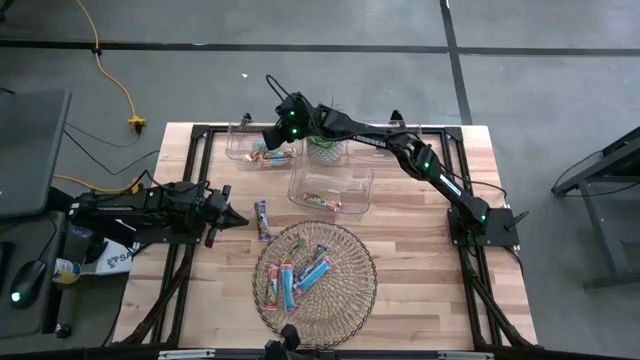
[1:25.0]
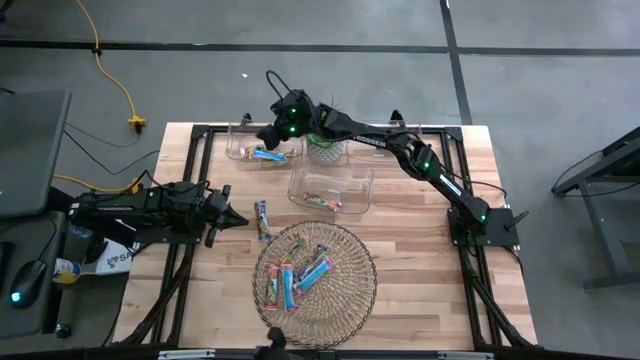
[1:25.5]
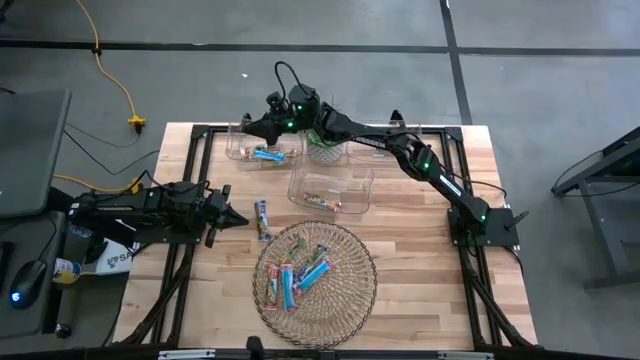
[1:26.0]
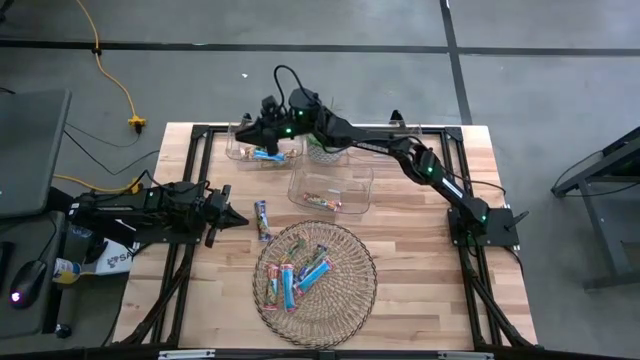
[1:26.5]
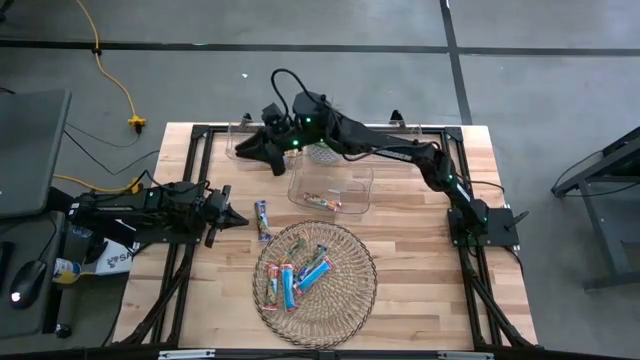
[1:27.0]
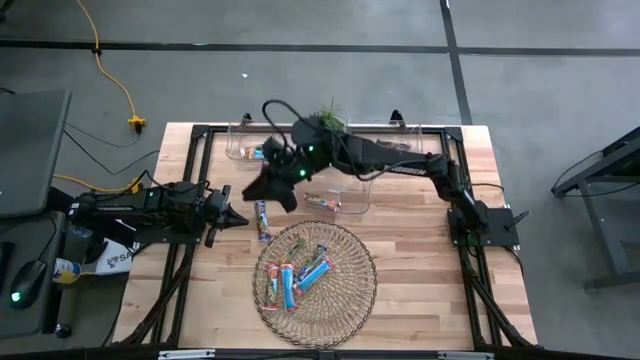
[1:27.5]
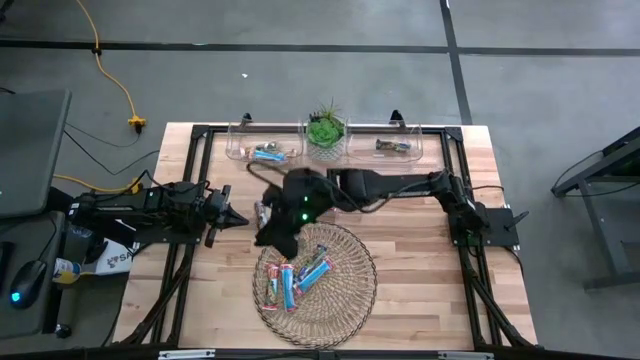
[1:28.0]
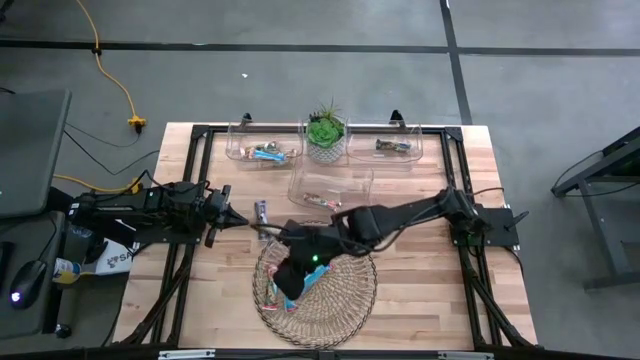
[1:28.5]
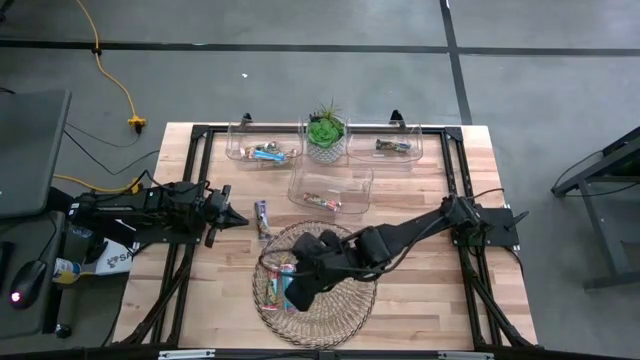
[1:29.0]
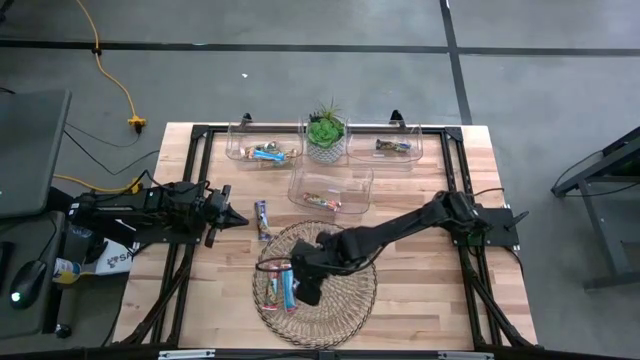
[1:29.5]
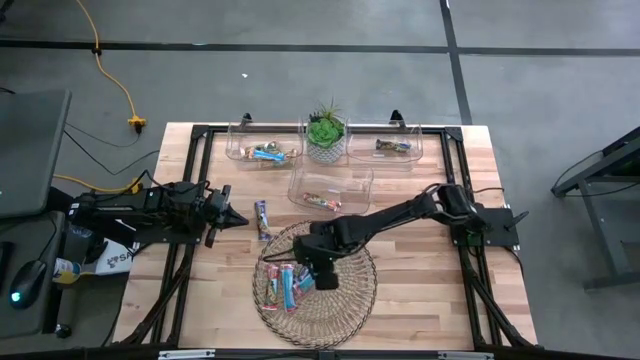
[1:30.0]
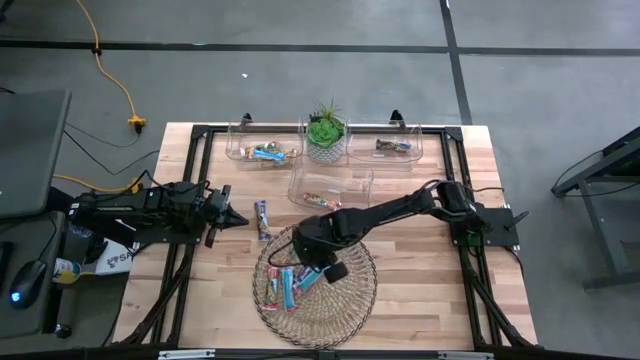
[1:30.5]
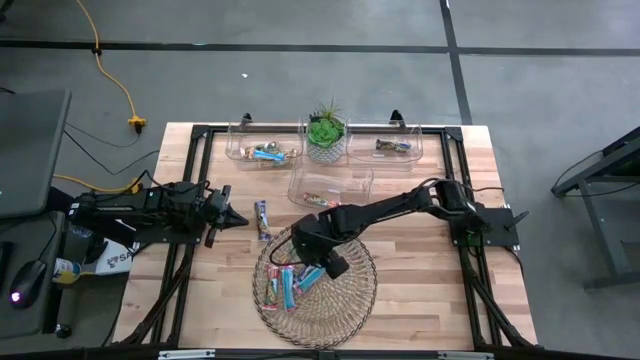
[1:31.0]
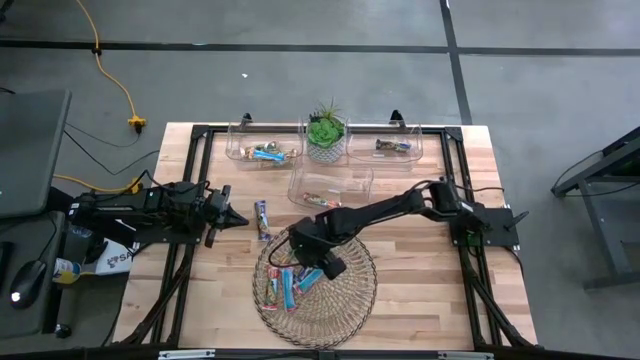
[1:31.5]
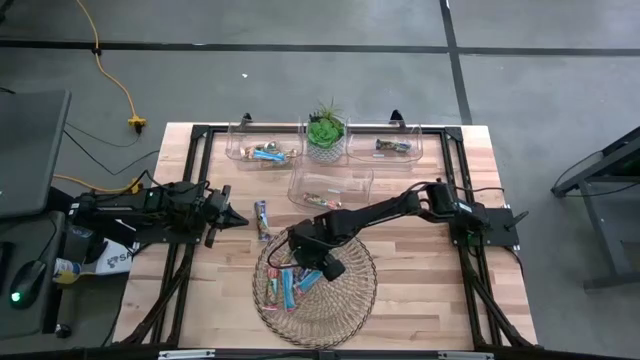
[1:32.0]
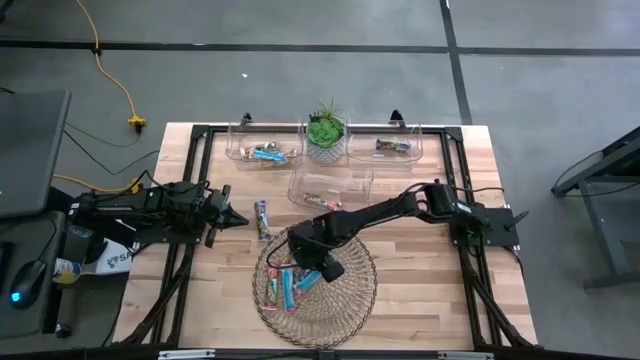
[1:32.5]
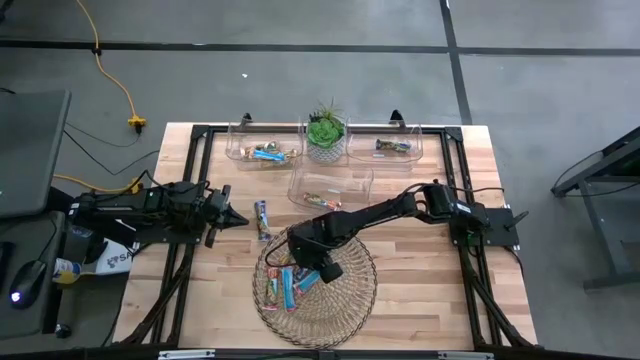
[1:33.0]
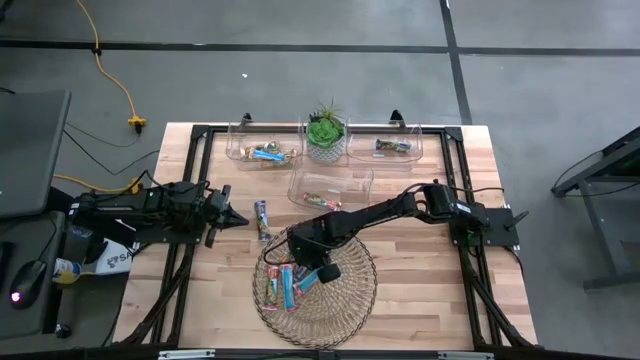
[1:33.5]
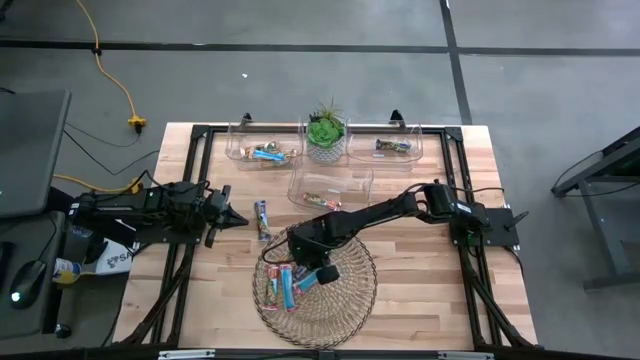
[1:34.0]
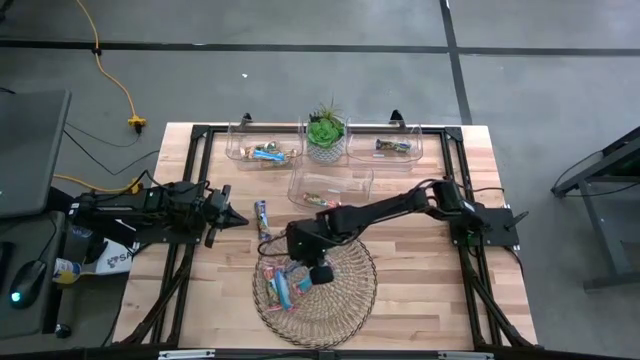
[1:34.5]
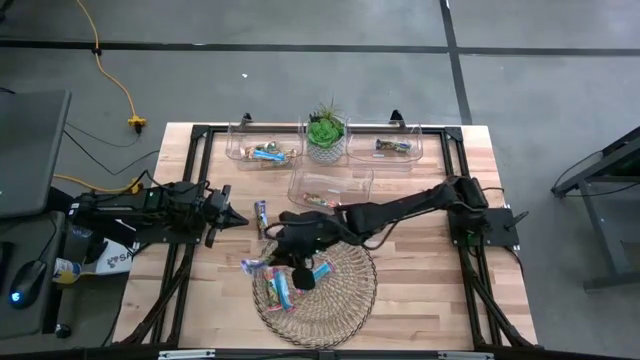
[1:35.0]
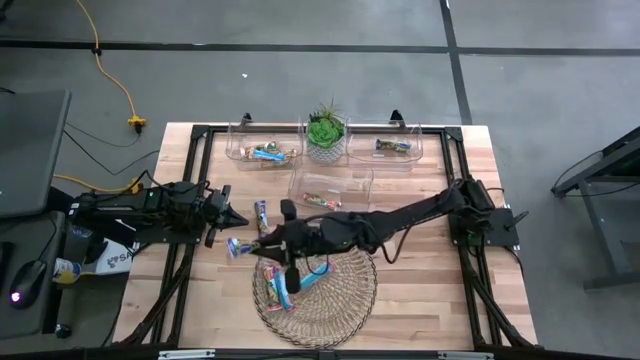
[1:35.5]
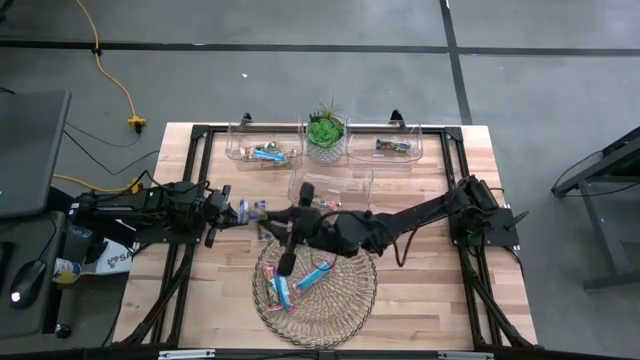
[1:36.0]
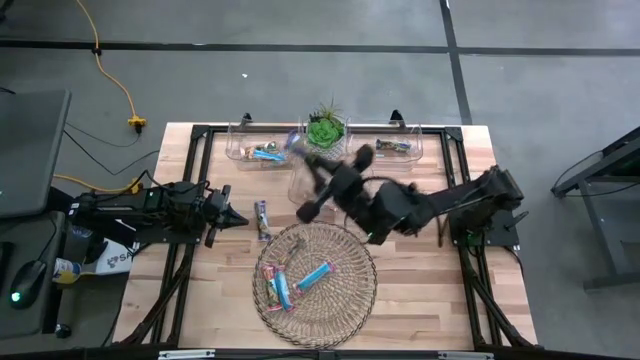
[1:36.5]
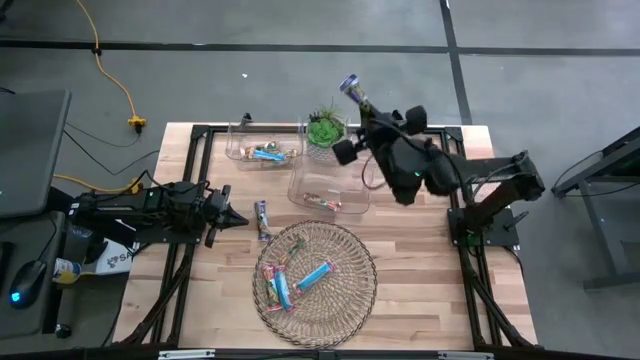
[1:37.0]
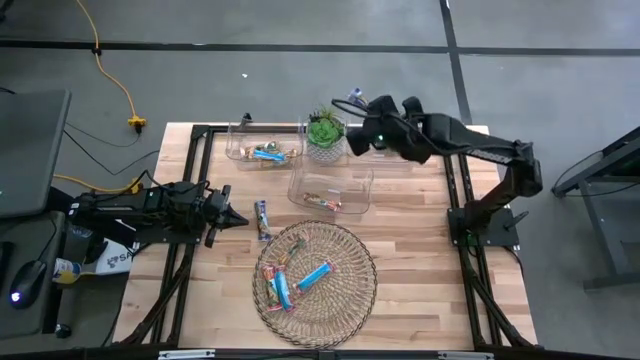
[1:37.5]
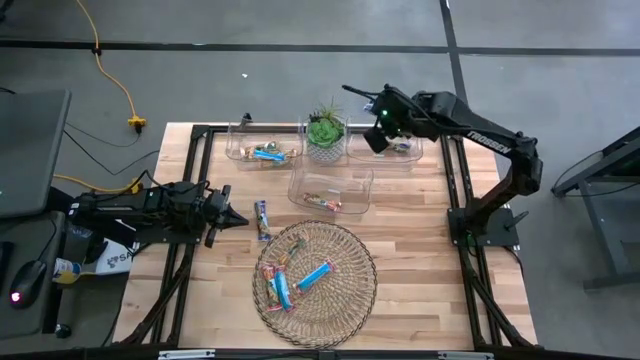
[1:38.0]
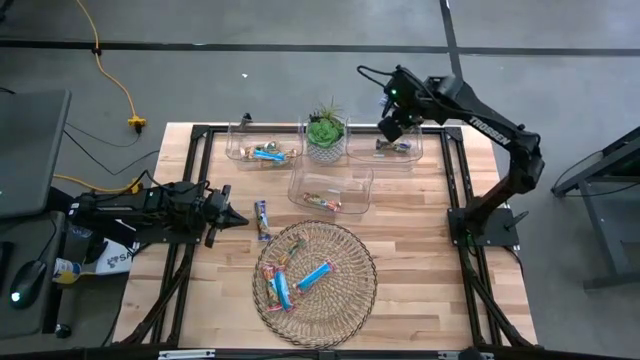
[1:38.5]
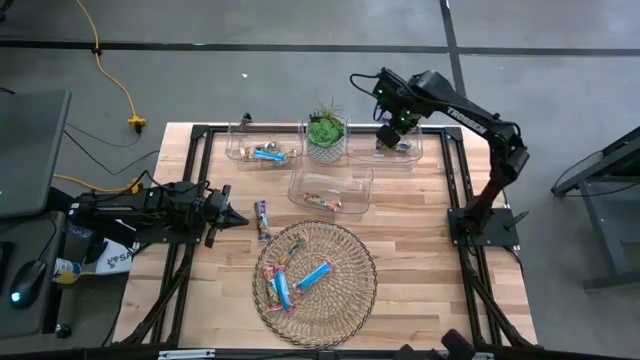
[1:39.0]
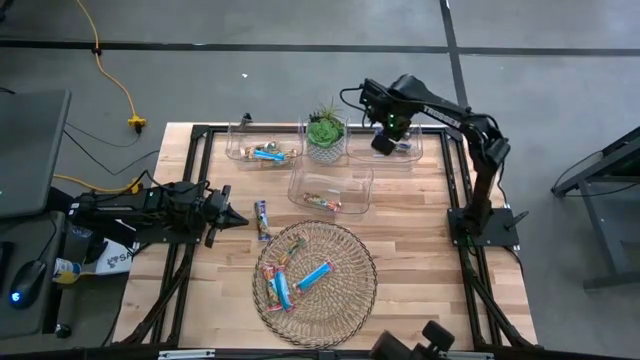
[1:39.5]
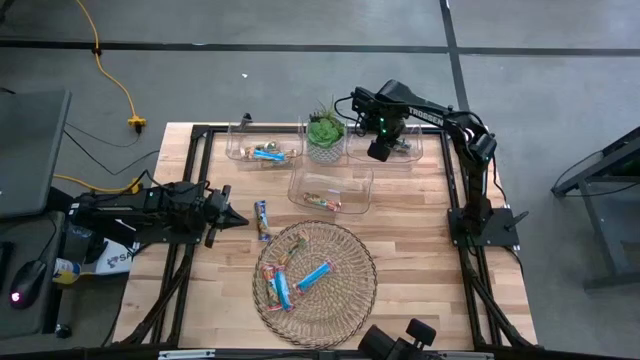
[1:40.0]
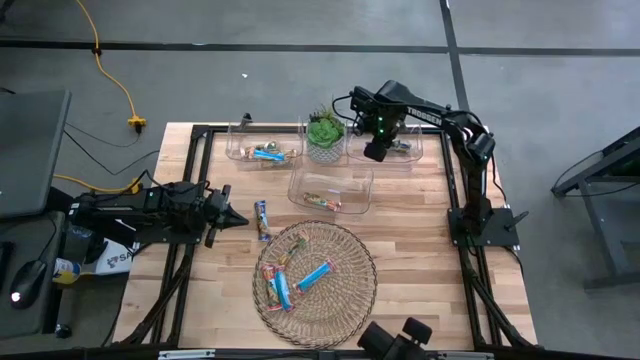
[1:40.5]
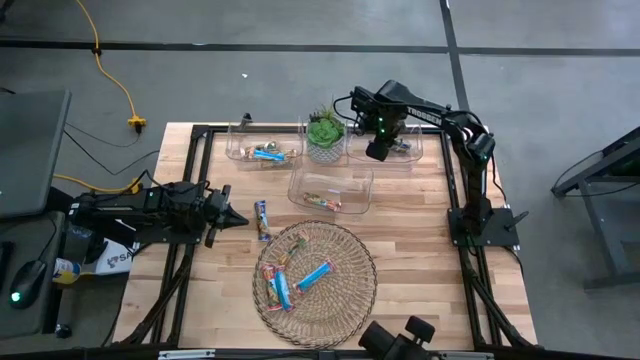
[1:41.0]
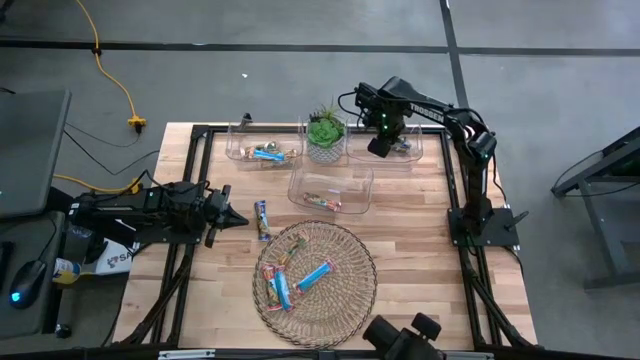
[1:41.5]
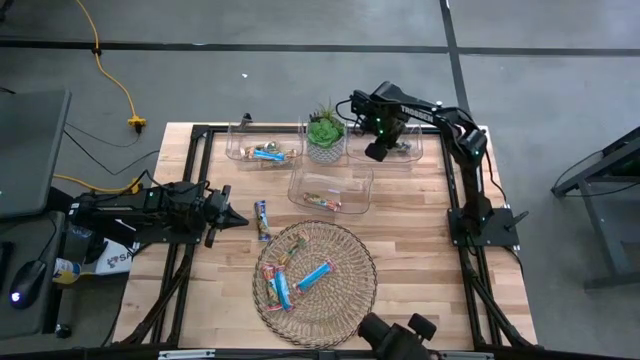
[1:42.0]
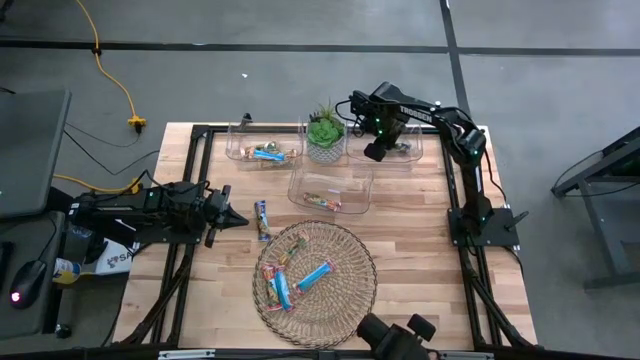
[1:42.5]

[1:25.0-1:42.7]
Task: Pick and place Granola Bars by type
Put the blue granola bar into the top right transparent bin
